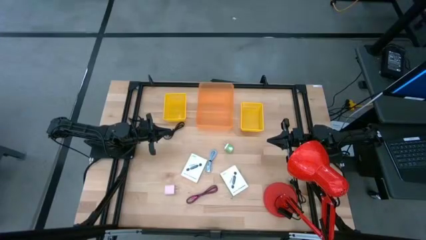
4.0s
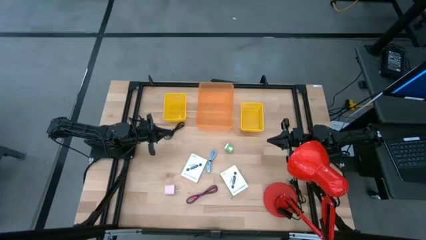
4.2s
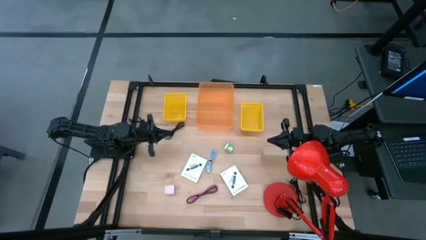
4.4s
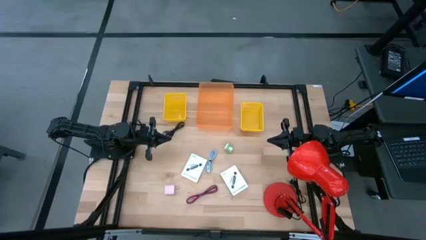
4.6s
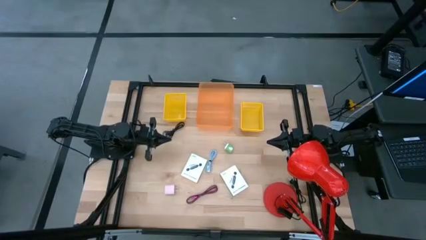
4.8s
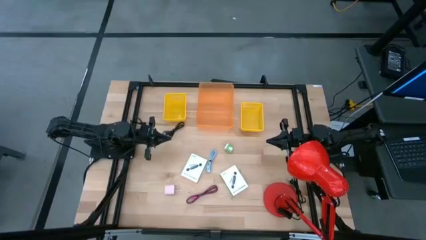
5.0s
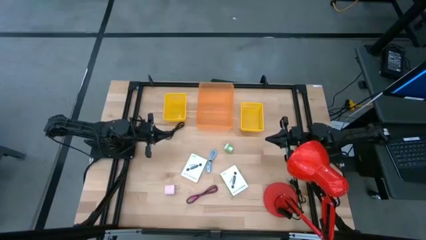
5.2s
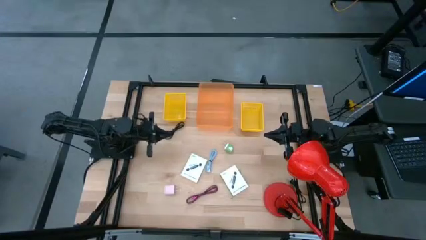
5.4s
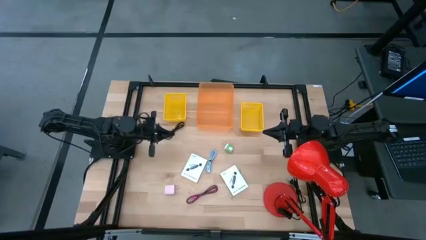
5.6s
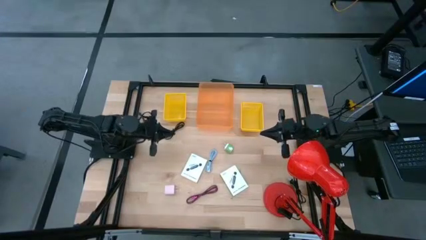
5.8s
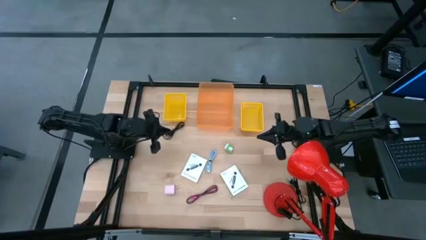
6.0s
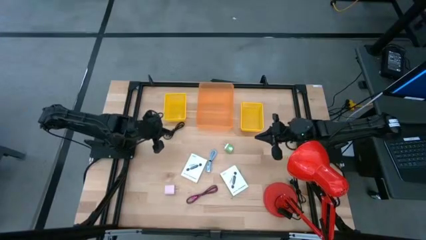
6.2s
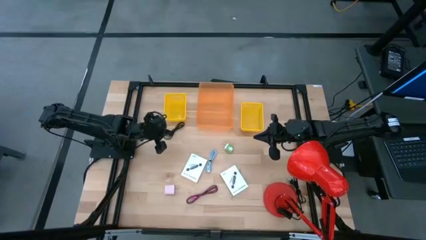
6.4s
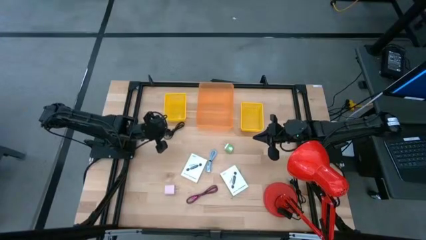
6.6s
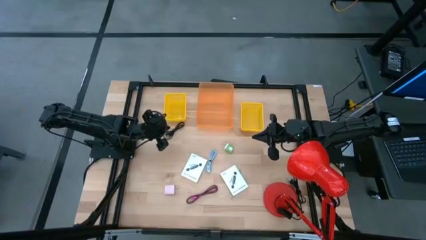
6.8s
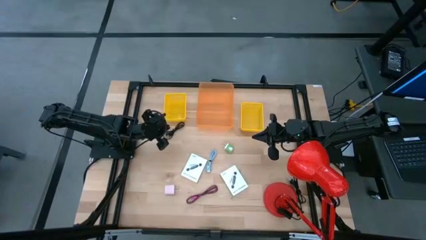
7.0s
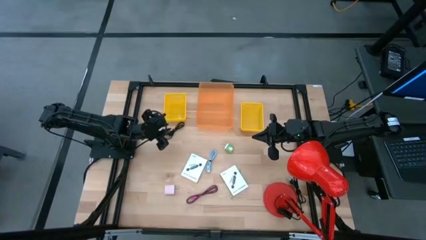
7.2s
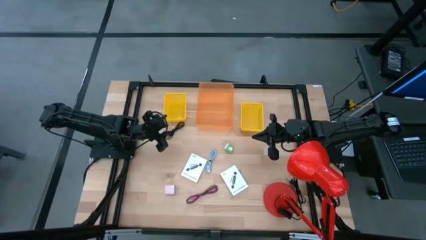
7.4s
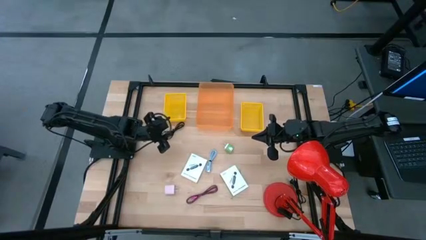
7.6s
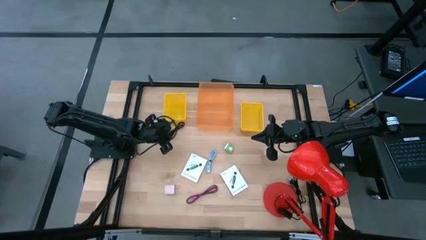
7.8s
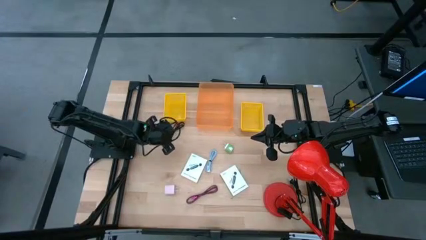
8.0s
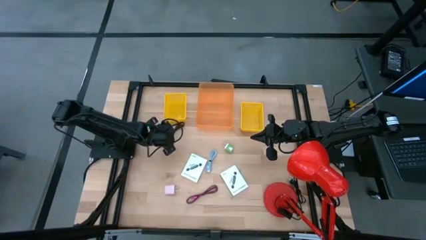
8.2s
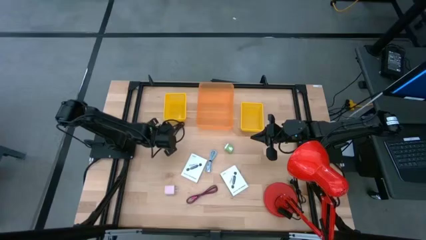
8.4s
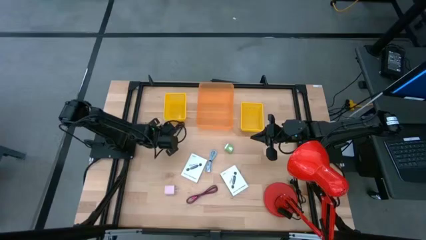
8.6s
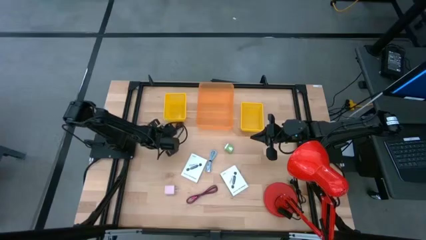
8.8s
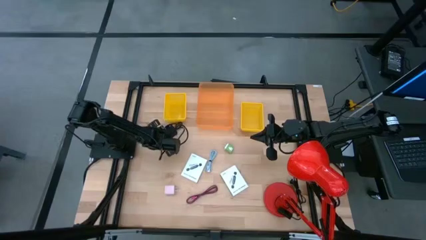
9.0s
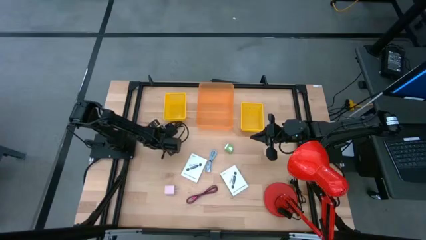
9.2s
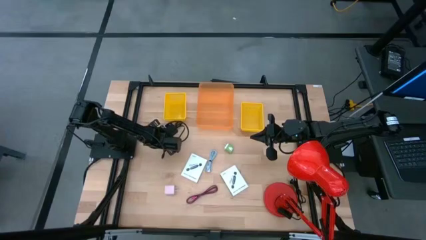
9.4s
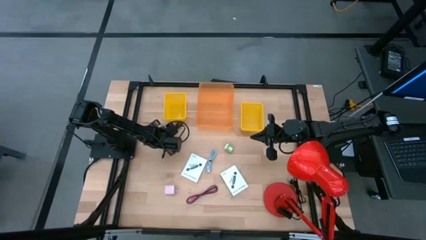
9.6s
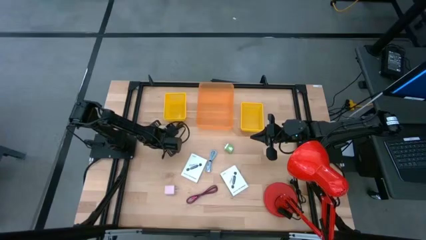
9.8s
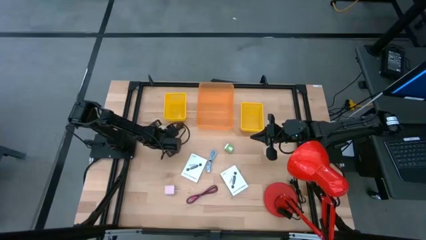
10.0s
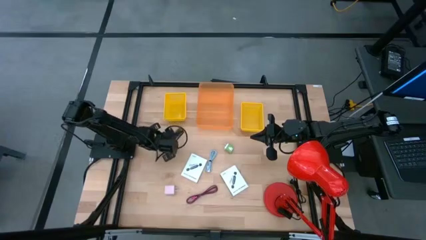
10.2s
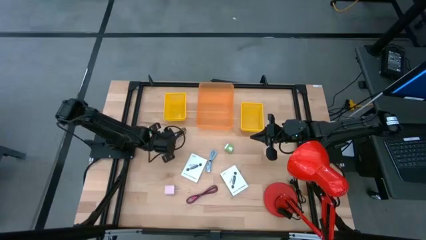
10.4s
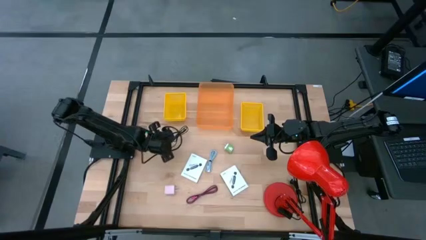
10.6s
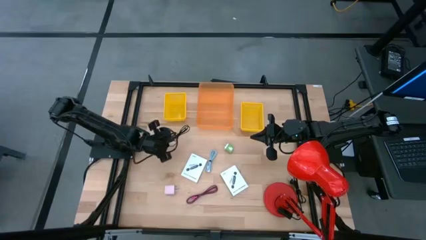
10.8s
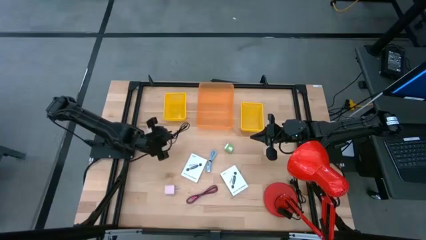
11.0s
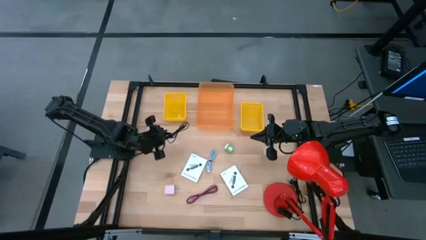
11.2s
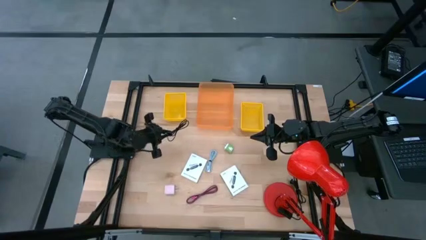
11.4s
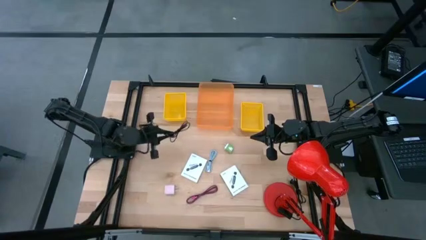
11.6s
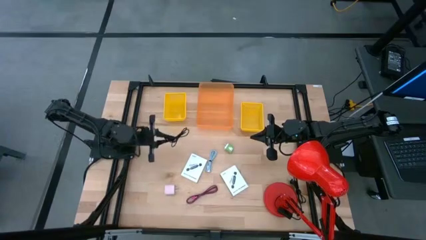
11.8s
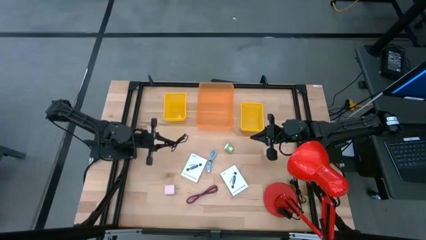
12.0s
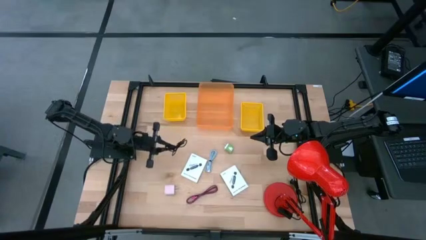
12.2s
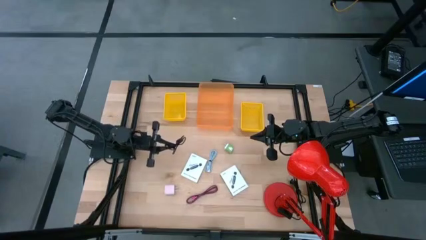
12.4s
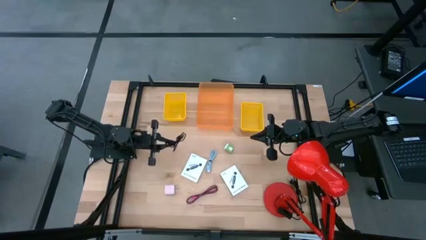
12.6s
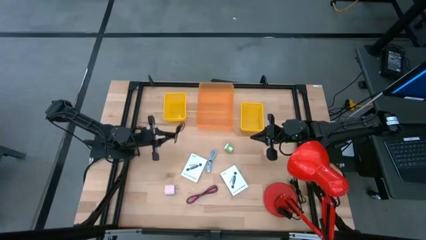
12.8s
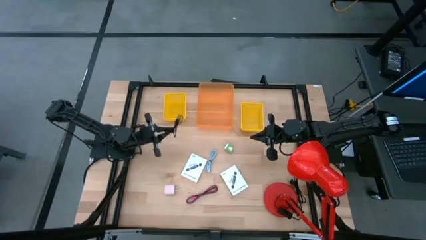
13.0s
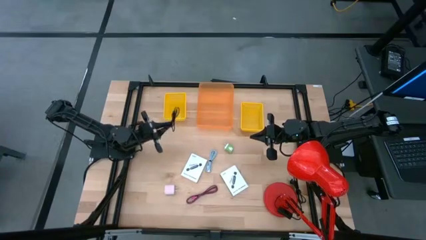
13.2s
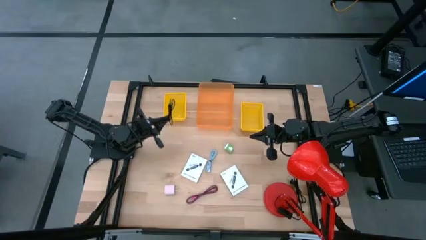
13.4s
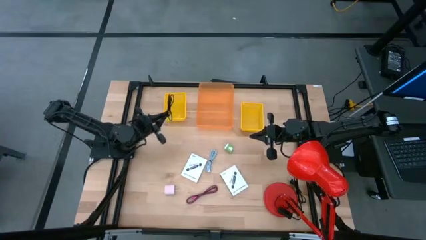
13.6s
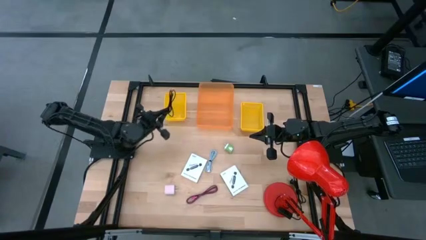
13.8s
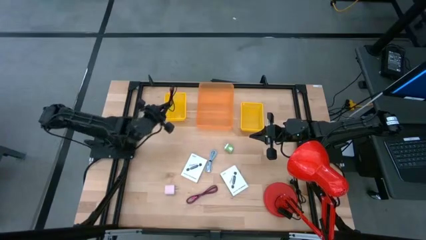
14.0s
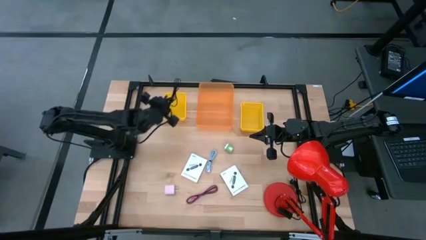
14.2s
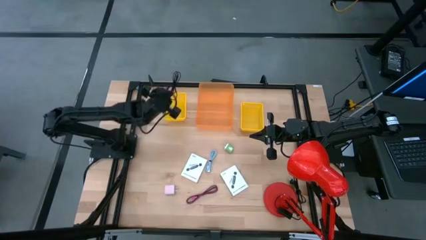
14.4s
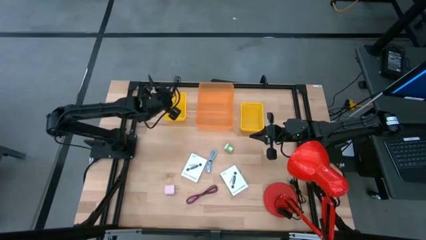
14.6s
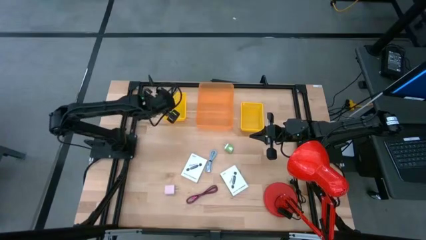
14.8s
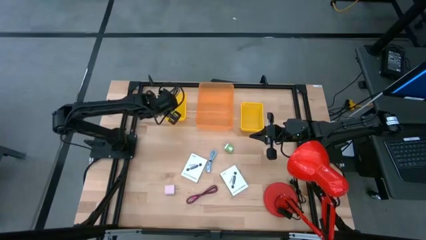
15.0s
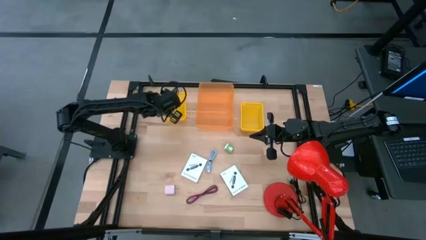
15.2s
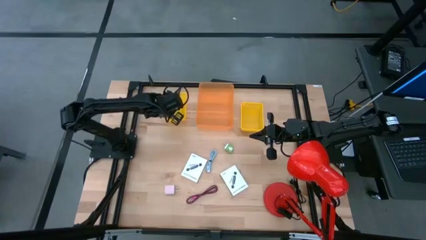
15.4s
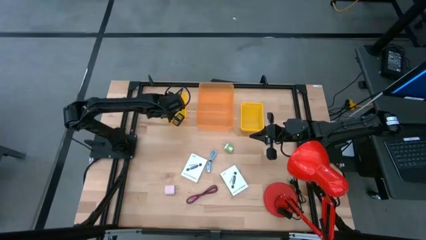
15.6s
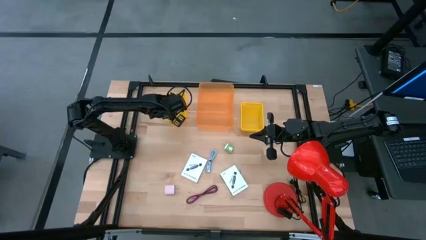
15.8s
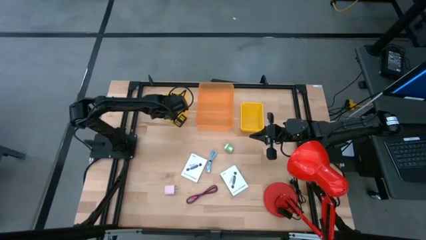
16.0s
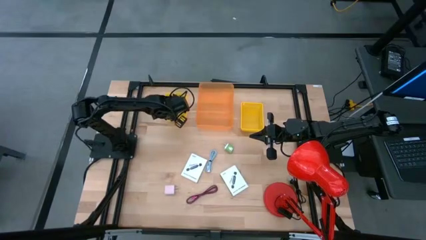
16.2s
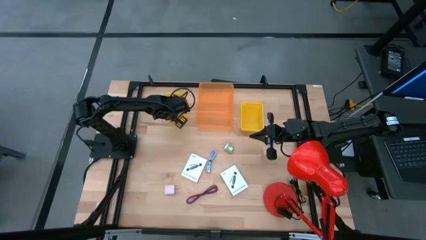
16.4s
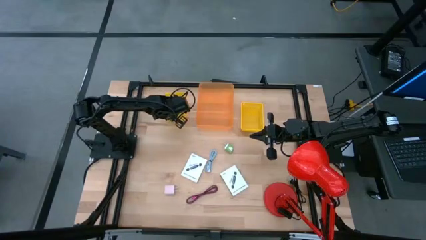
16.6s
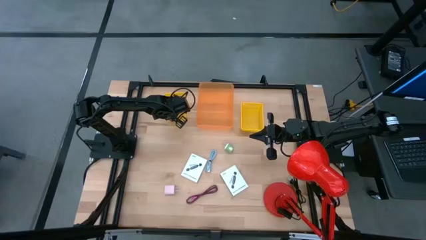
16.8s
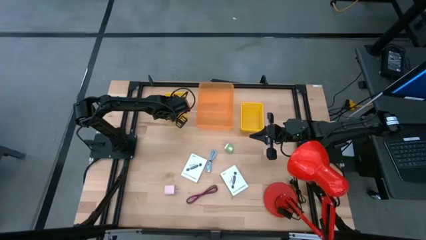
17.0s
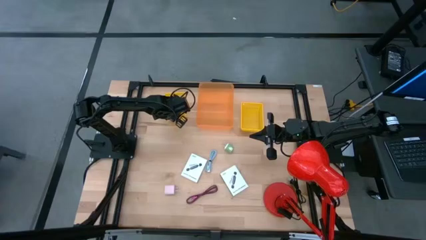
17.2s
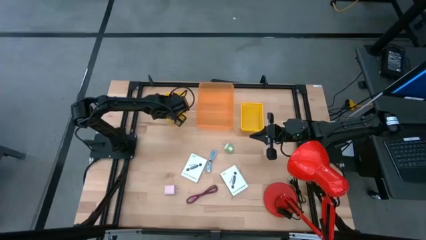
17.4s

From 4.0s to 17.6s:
Task: Pick and place items into bin
Put the black charger cable into the left yellow bin

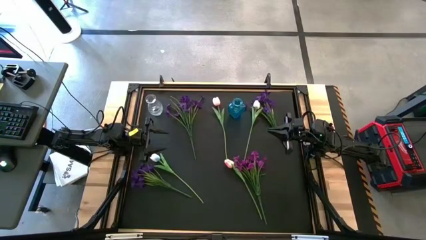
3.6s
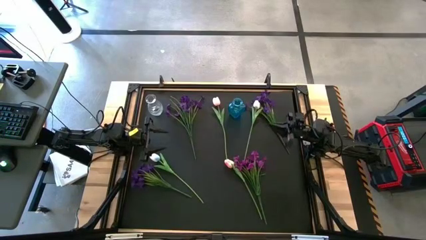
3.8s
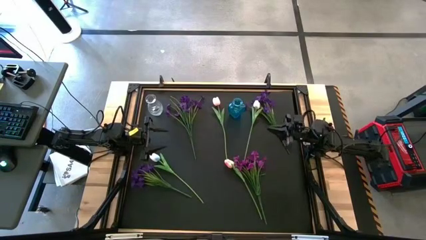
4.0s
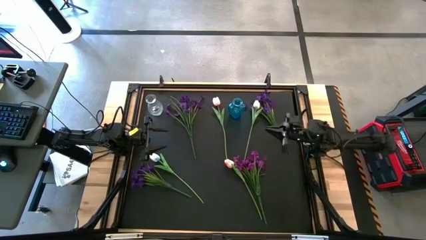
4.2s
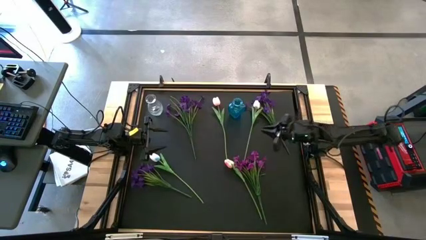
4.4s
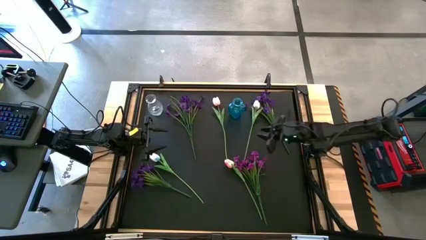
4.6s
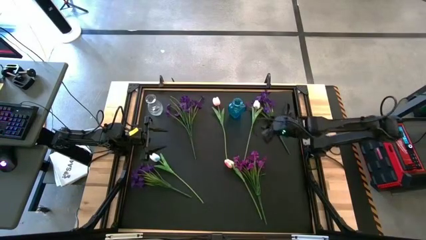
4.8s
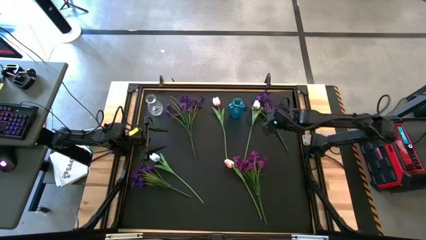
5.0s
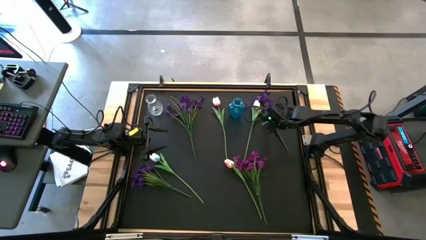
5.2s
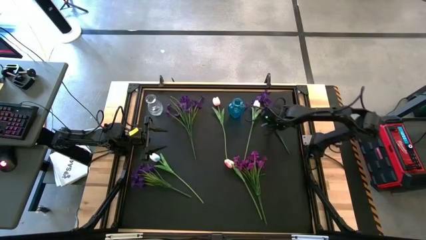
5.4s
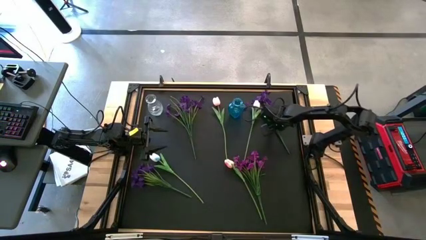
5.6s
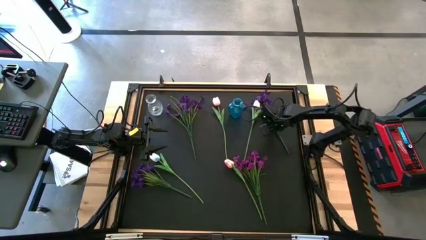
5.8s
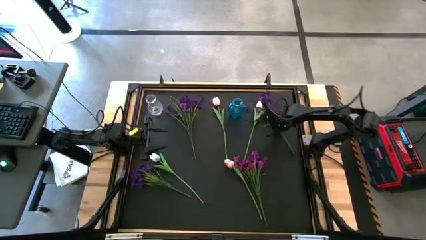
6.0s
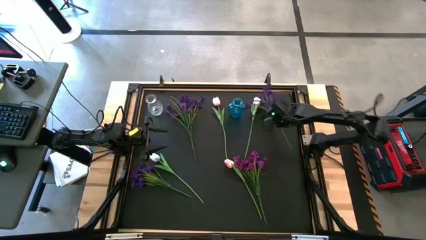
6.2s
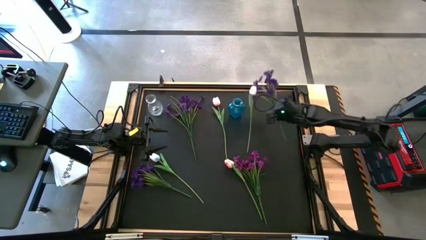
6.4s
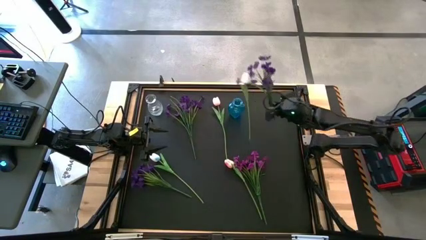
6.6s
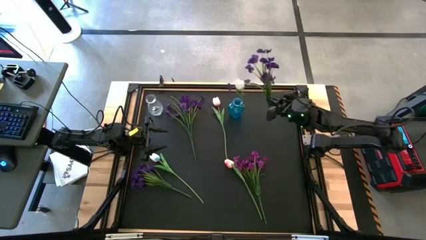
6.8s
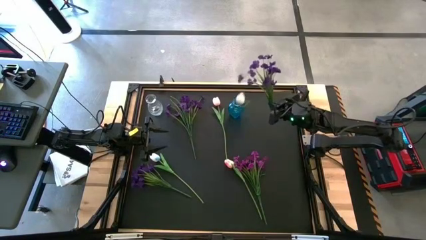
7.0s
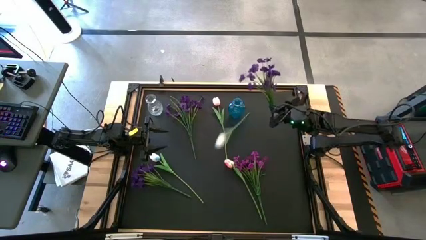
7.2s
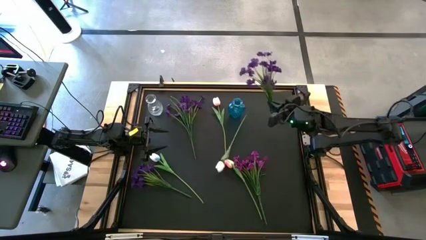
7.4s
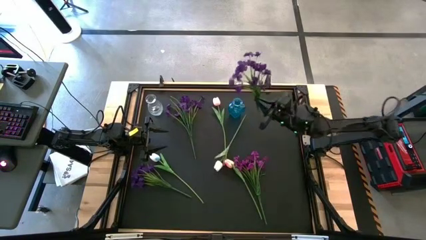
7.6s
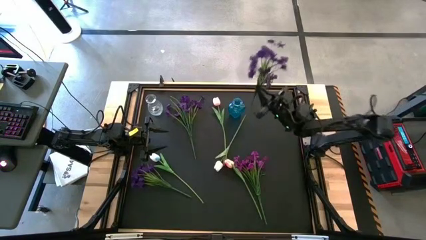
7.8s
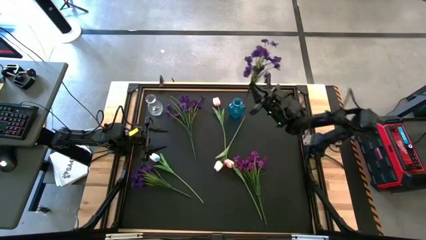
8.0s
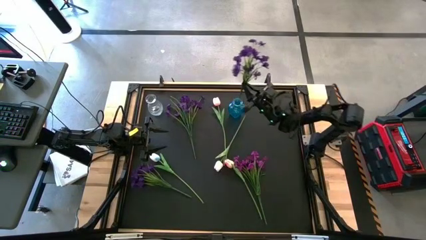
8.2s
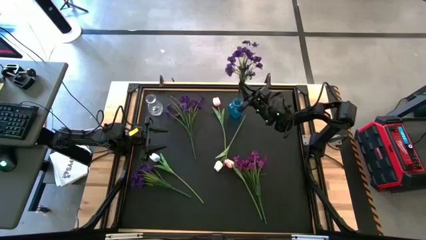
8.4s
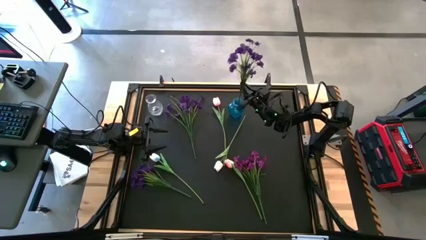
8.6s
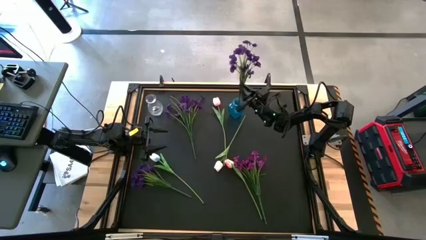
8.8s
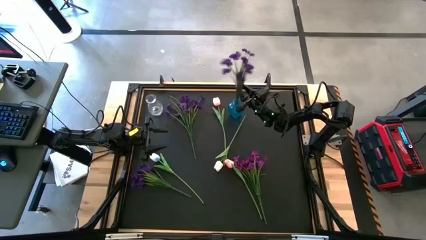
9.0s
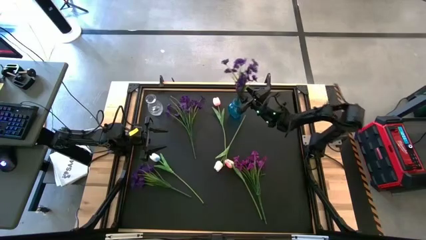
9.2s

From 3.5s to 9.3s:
Task: Sort flowers into vase by color
Put the top right violet flower into the blue vase
